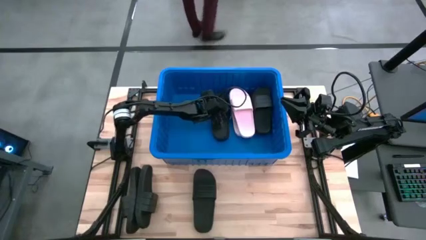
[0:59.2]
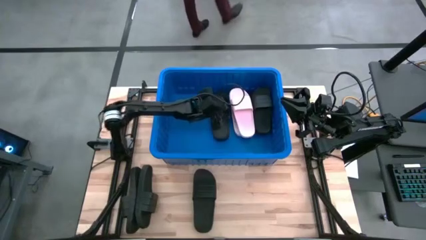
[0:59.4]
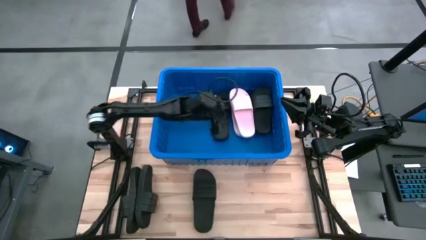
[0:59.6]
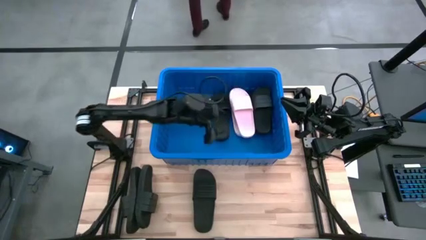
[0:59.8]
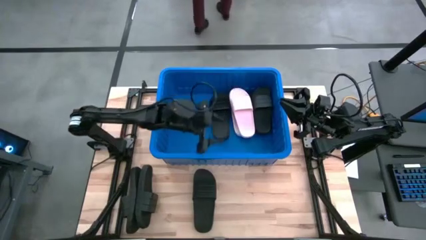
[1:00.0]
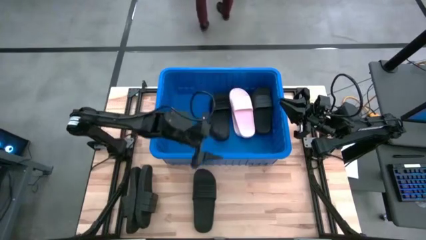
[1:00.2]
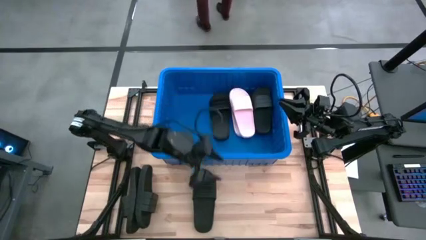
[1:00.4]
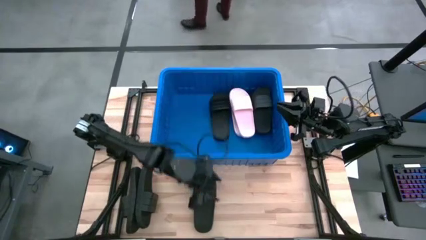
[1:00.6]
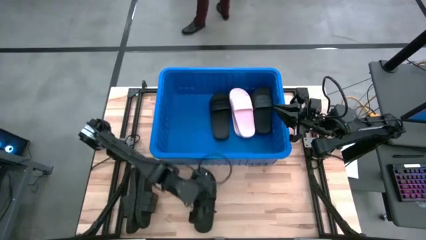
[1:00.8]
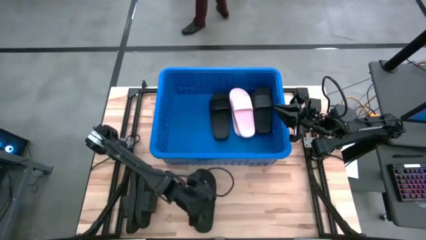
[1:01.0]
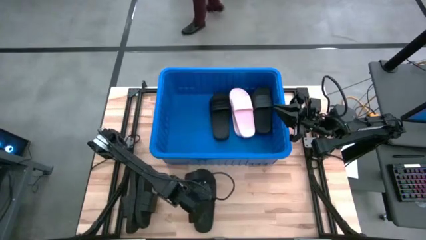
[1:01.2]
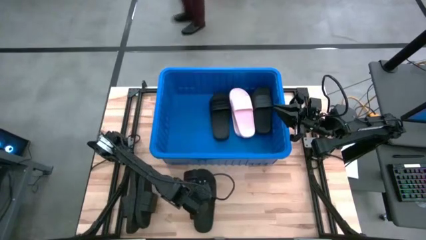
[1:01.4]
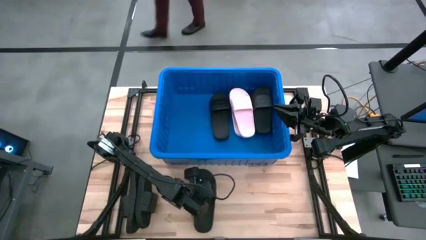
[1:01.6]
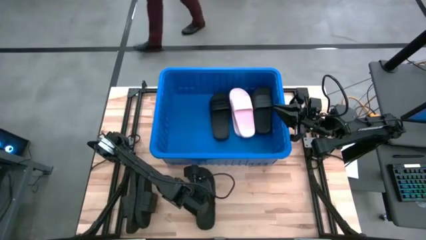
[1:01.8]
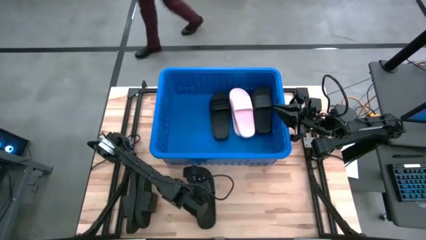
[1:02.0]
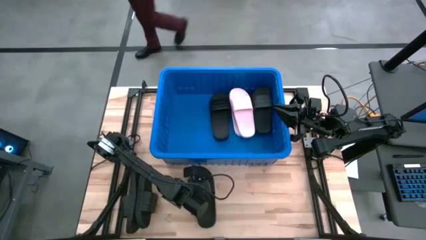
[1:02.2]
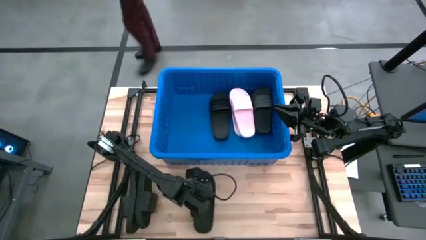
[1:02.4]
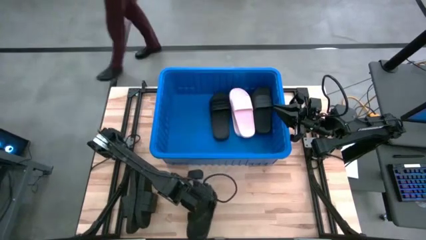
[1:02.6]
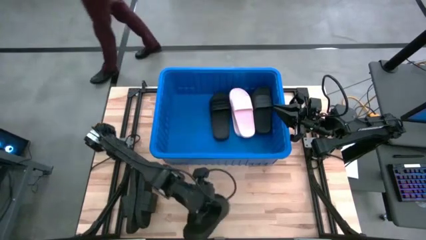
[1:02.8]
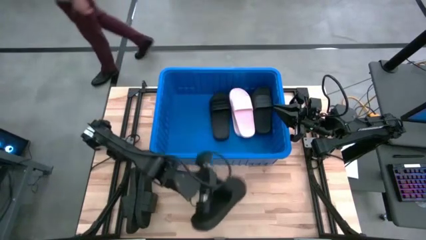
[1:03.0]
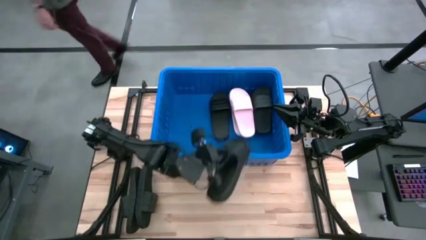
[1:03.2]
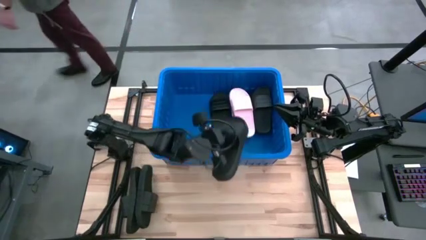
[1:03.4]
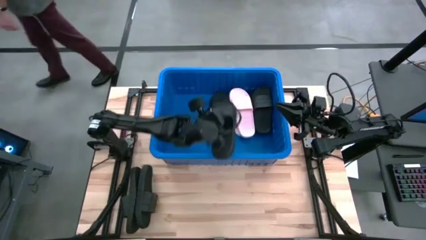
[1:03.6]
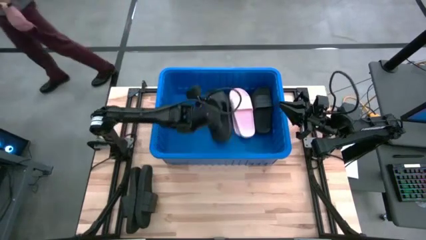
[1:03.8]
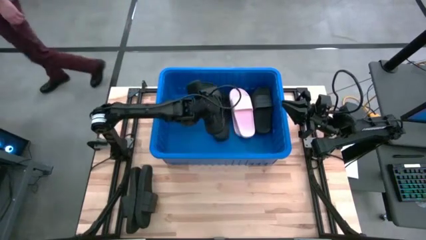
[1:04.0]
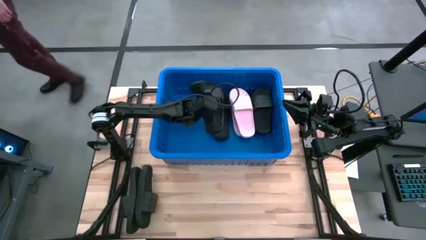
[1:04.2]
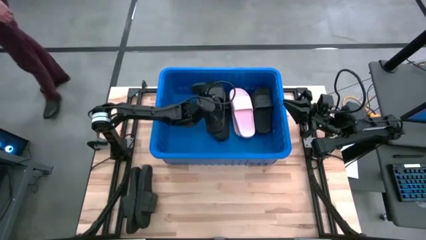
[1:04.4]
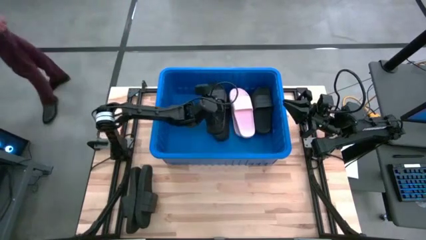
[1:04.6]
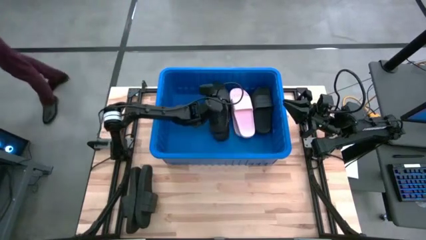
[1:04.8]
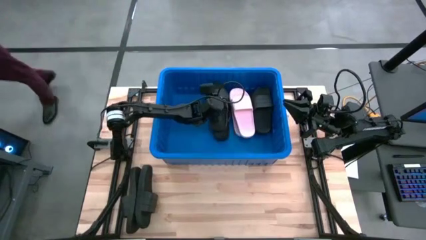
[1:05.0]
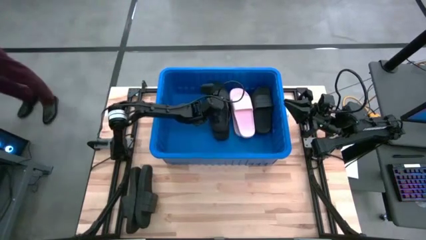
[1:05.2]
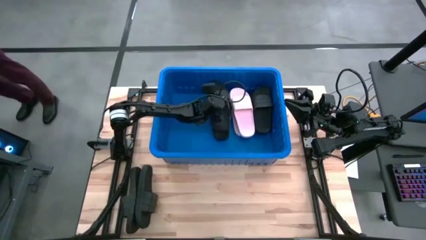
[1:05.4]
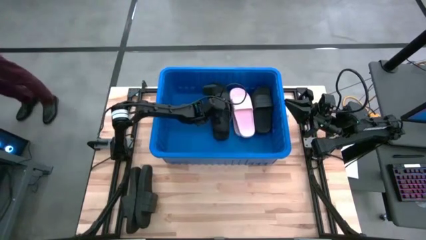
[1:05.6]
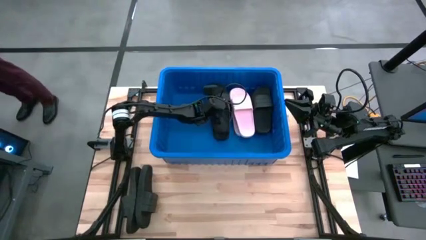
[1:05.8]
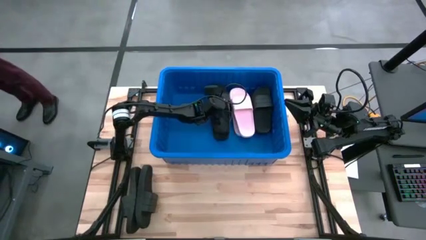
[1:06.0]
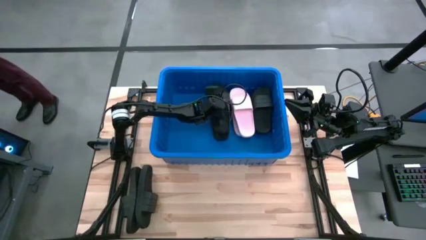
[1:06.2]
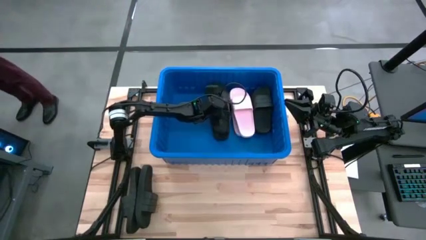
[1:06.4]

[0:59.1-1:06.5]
Task: Pick and place slides into bin
Put the black slide into the blue container

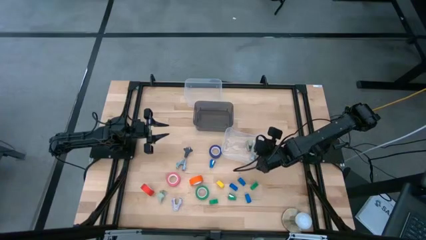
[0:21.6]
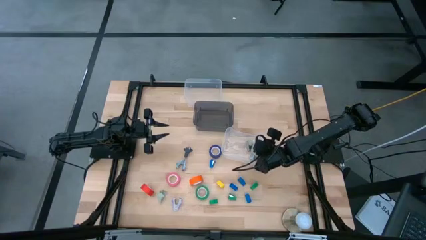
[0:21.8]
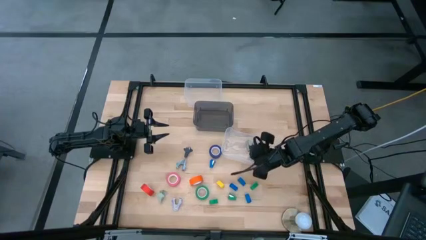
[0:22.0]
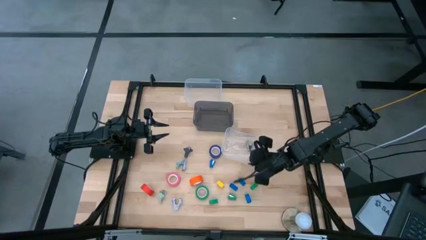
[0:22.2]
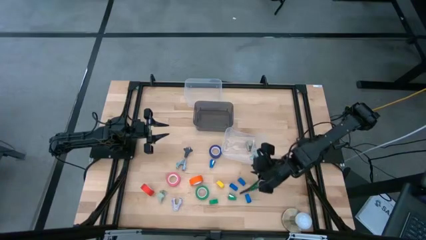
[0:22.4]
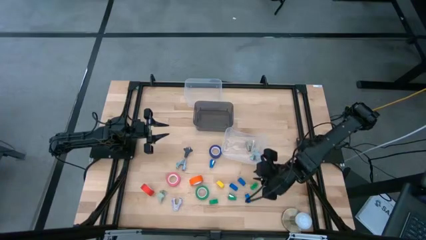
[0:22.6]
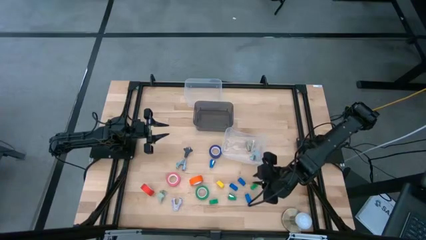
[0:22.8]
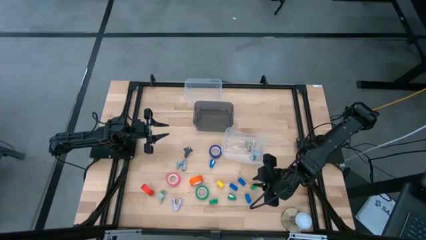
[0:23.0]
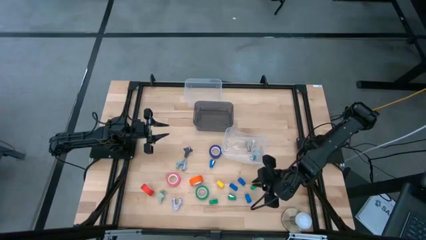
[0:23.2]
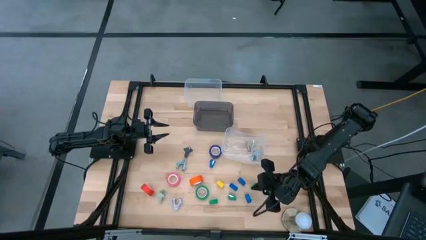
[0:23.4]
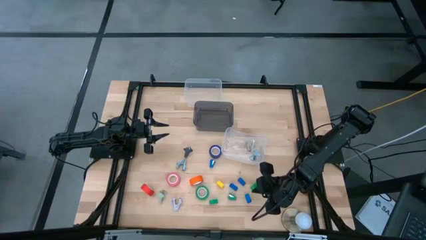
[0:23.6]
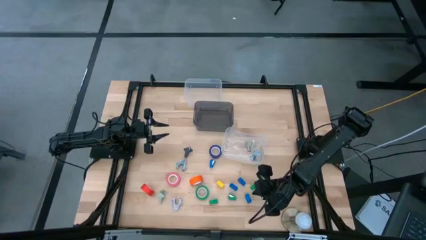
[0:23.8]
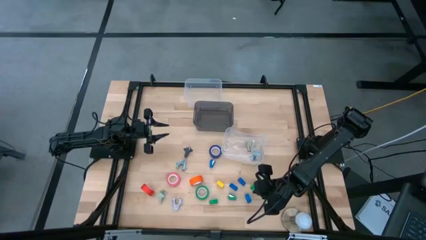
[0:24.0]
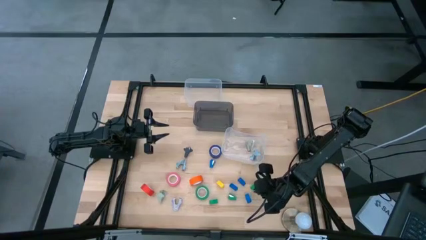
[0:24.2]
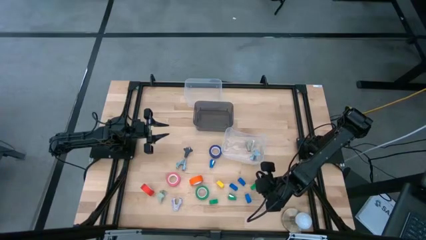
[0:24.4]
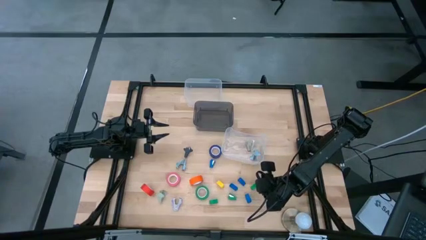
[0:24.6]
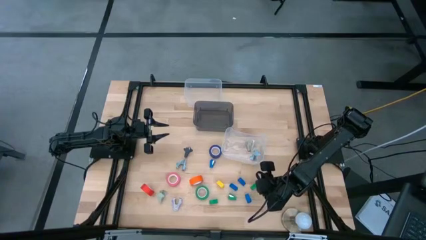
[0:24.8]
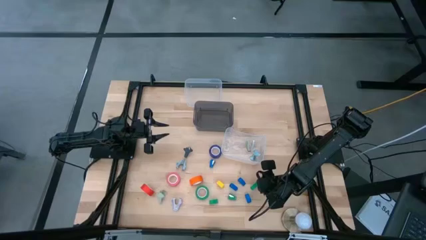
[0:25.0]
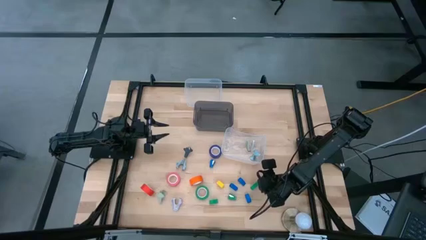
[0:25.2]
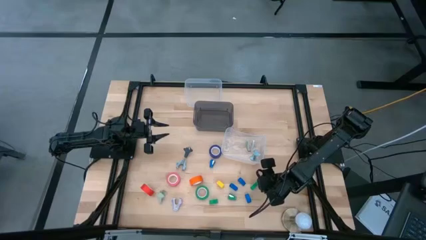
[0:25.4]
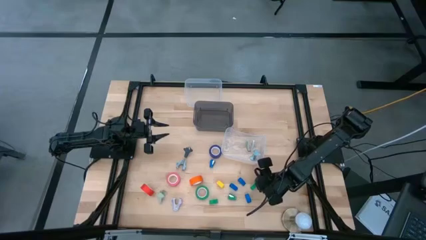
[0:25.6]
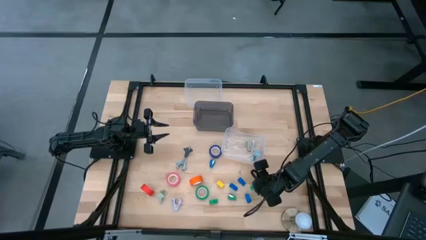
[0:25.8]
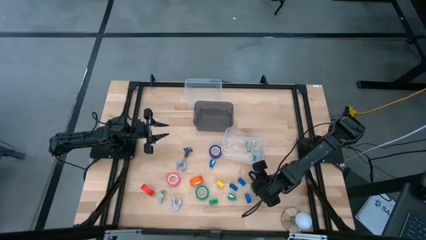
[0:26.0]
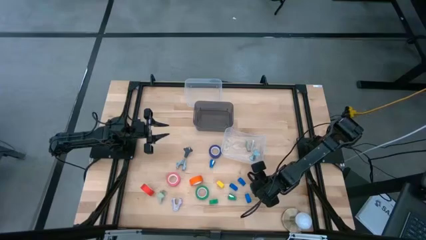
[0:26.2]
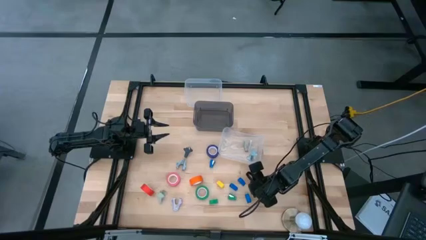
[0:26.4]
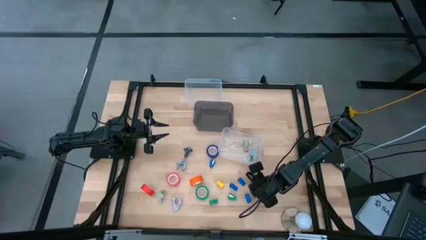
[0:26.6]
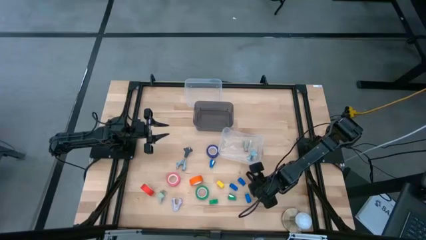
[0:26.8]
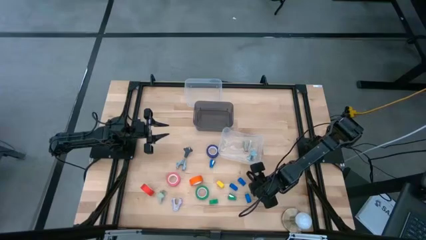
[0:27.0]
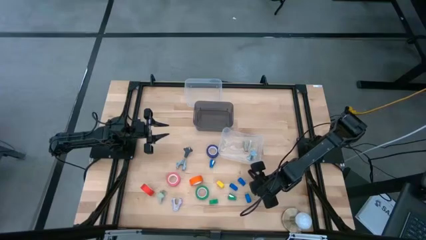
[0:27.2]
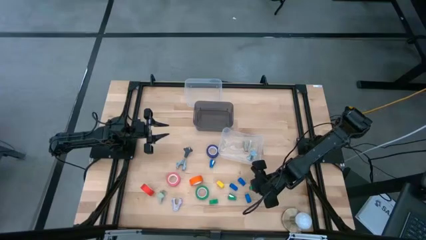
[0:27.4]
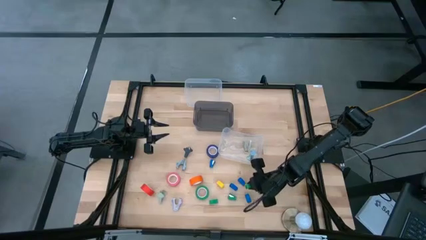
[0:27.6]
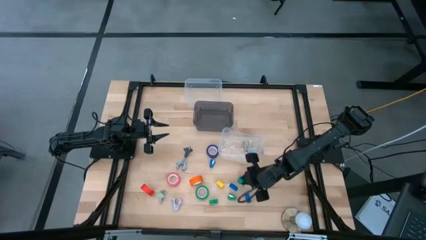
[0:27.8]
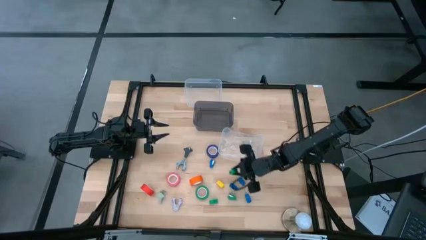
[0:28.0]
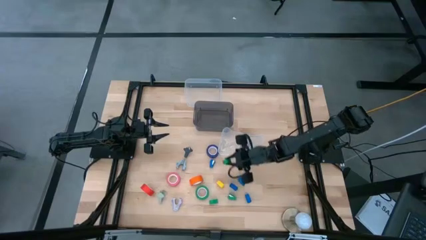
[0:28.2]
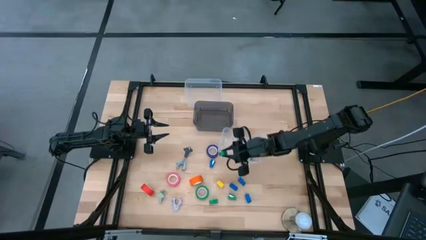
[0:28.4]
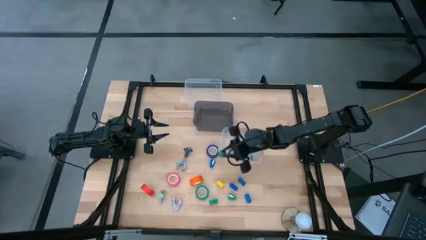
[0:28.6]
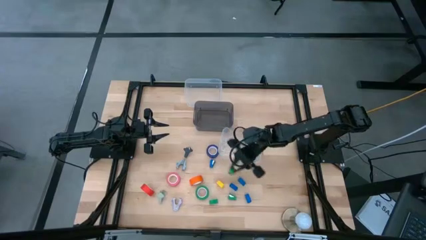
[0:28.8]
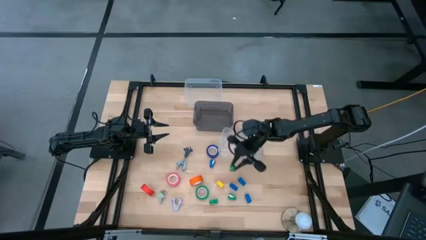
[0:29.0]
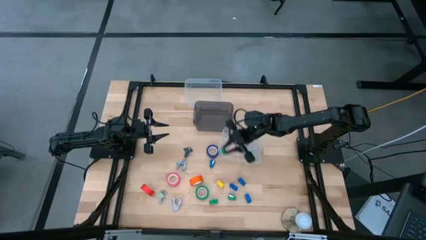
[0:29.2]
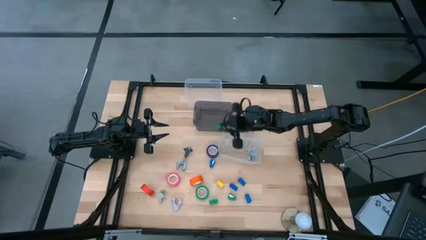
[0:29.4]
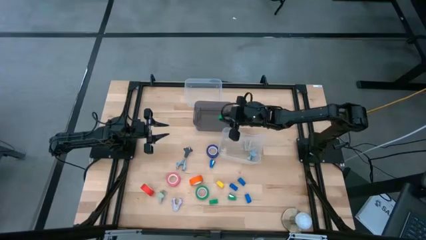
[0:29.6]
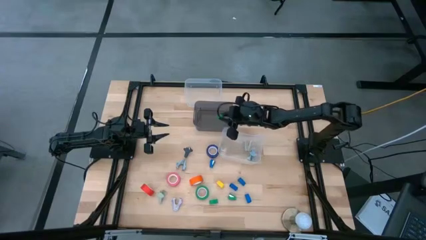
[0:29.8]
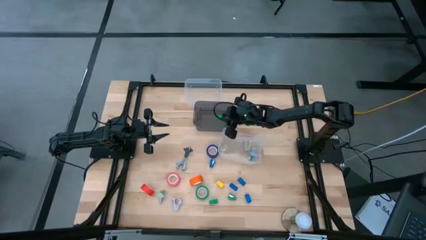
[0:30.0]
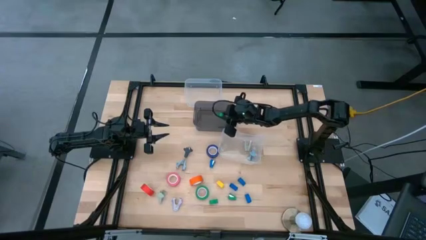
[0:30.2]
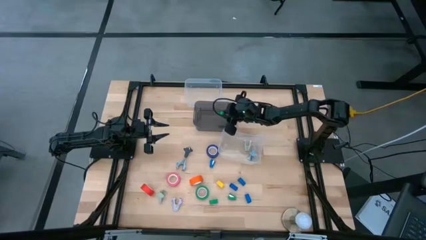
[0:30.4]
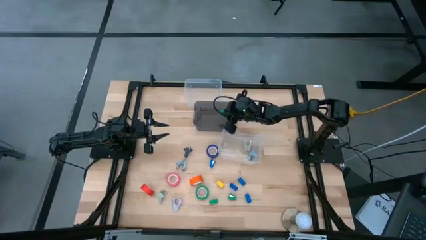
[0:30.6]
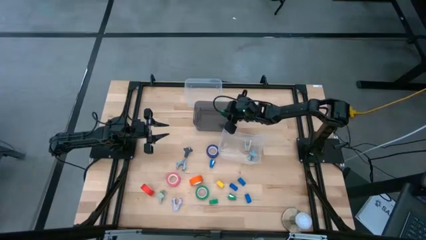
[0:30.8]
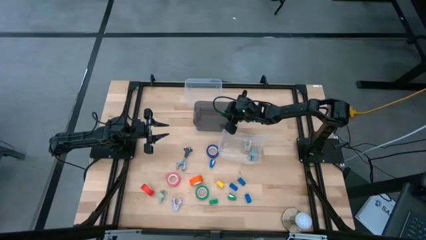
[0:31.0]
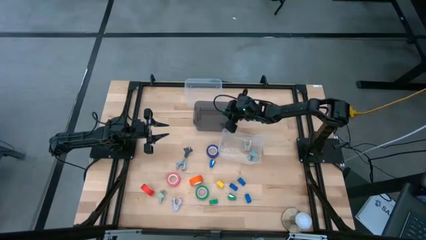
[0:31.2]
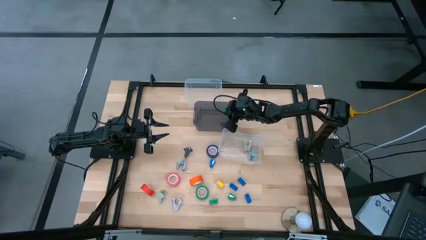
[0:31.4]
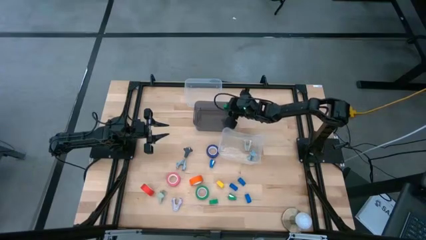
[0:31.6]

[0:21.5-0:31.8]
Task: Pick and place Stapler, Stapler remover, tape
Put the green stapler into the black bin
